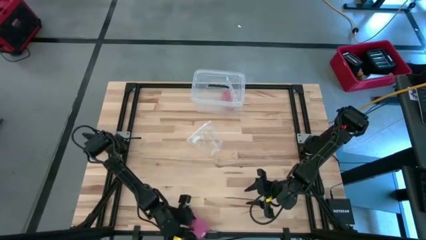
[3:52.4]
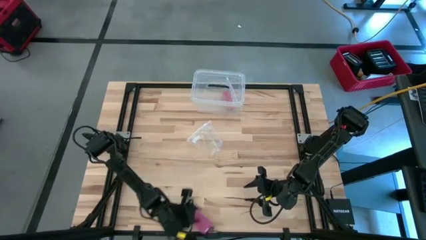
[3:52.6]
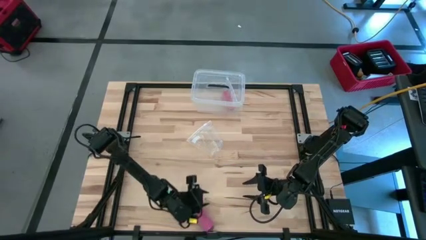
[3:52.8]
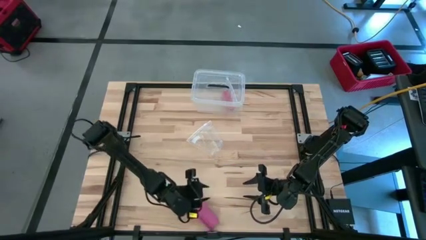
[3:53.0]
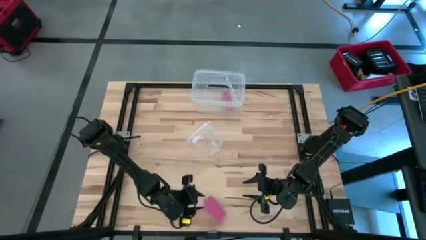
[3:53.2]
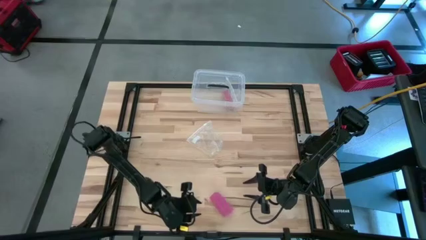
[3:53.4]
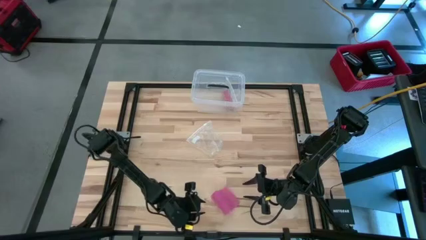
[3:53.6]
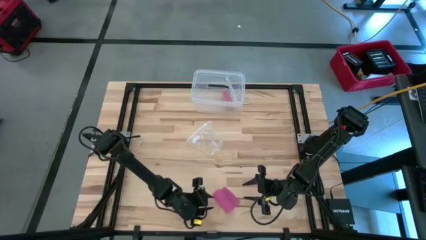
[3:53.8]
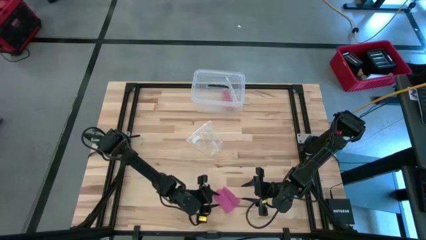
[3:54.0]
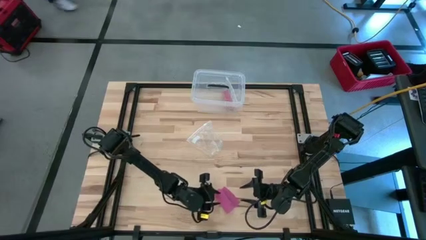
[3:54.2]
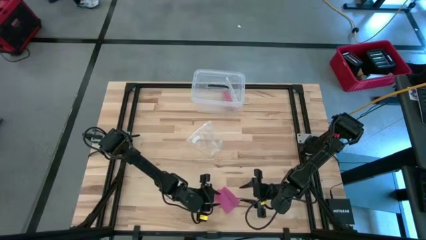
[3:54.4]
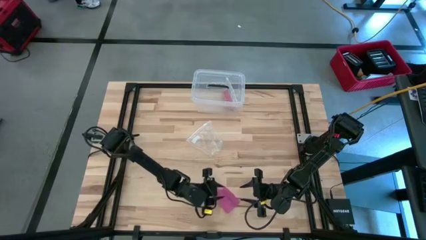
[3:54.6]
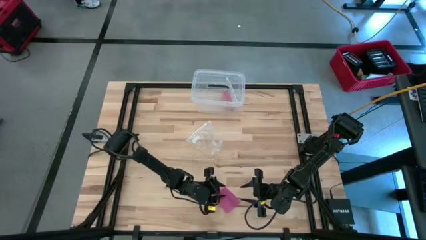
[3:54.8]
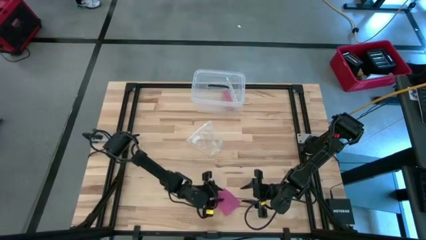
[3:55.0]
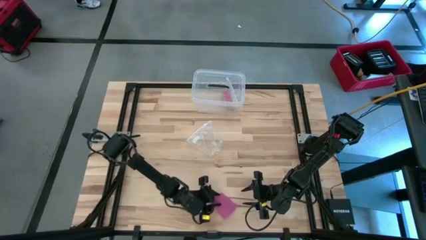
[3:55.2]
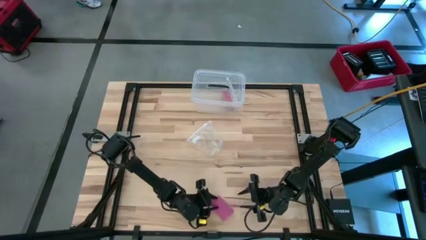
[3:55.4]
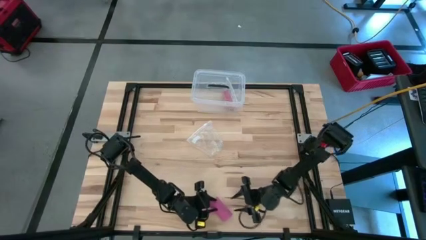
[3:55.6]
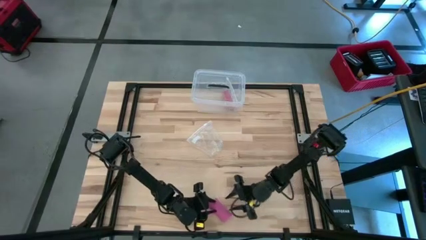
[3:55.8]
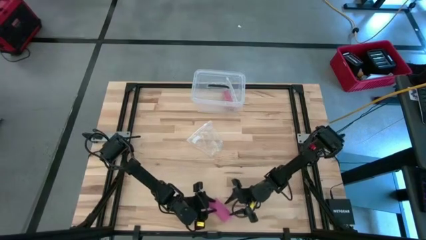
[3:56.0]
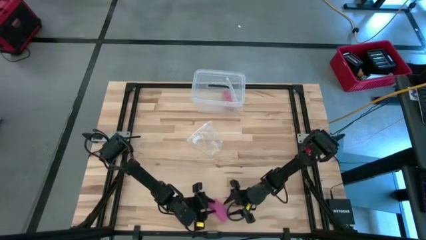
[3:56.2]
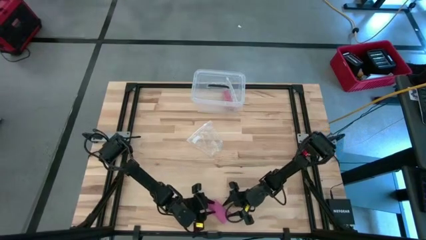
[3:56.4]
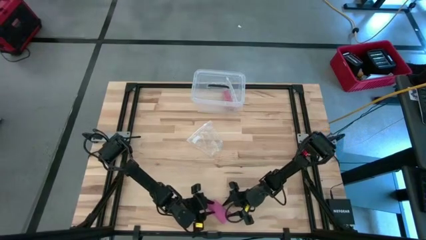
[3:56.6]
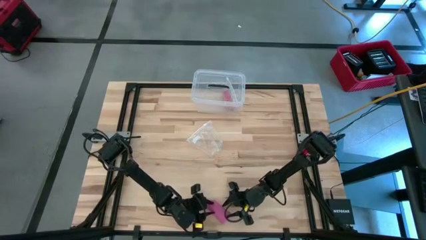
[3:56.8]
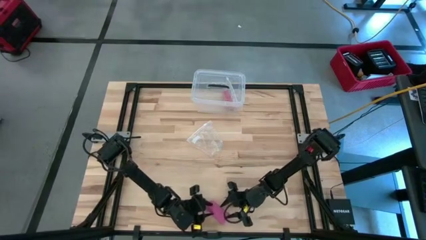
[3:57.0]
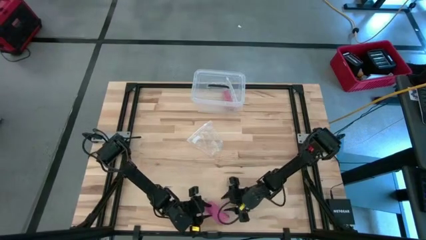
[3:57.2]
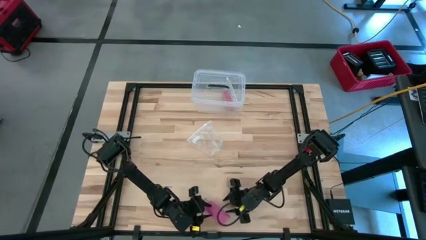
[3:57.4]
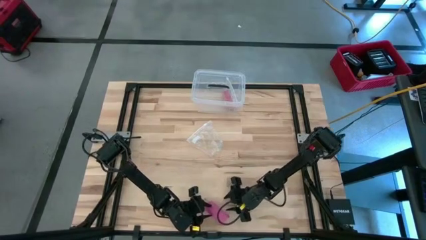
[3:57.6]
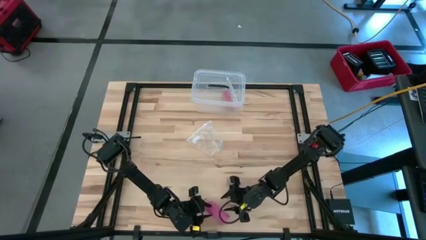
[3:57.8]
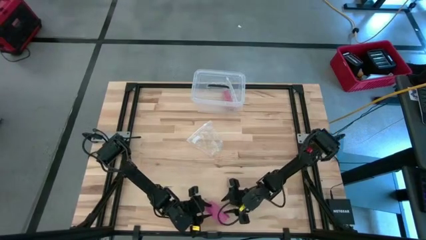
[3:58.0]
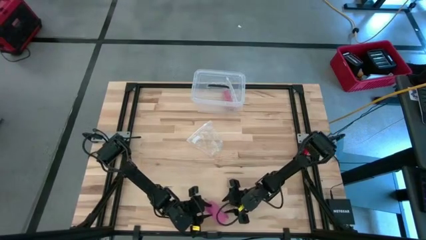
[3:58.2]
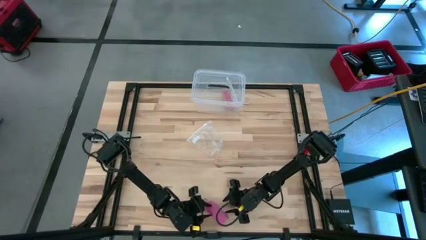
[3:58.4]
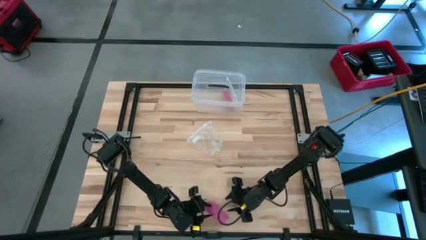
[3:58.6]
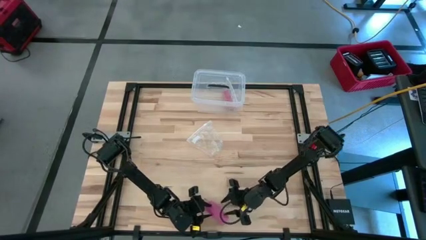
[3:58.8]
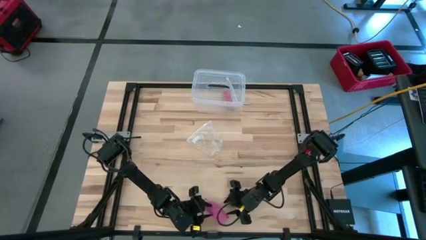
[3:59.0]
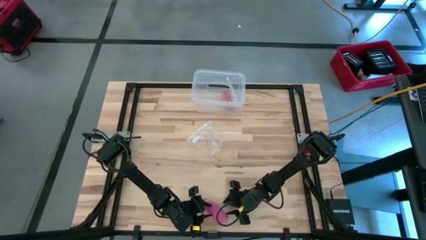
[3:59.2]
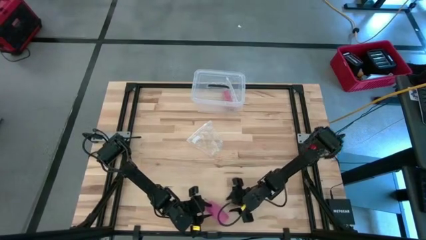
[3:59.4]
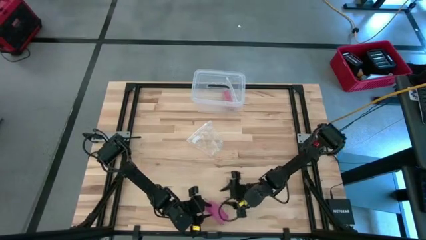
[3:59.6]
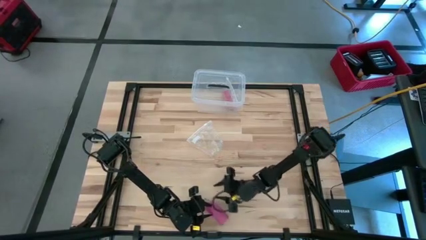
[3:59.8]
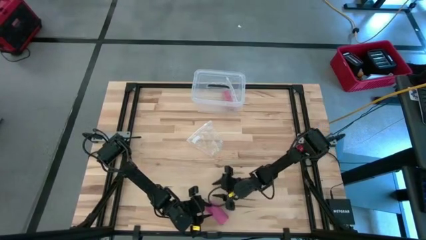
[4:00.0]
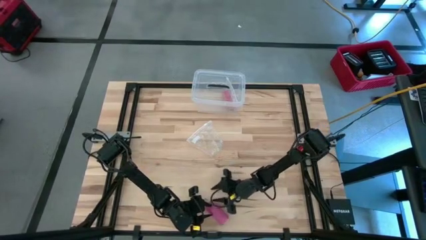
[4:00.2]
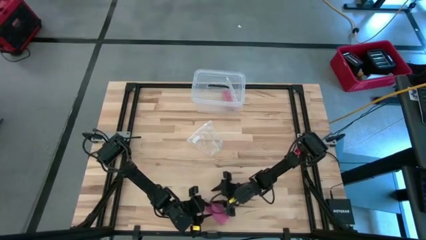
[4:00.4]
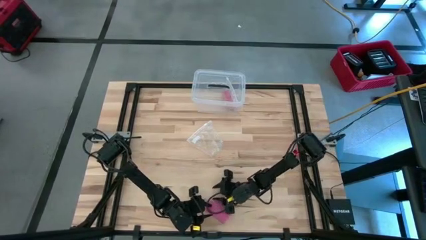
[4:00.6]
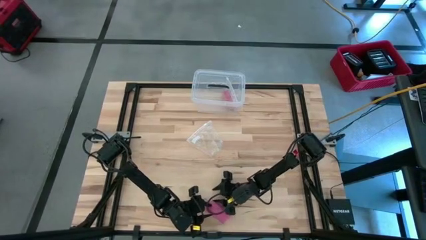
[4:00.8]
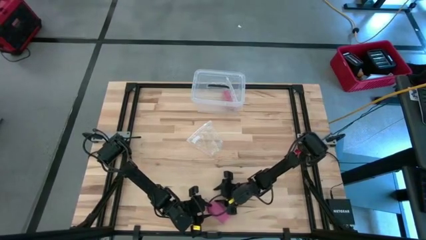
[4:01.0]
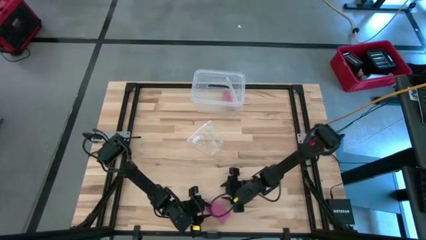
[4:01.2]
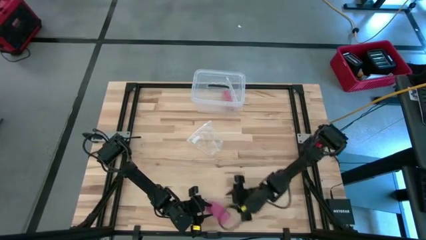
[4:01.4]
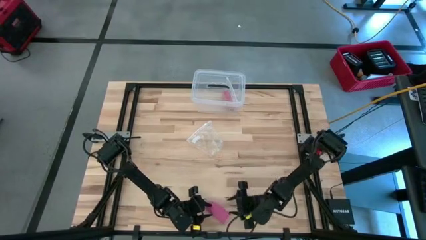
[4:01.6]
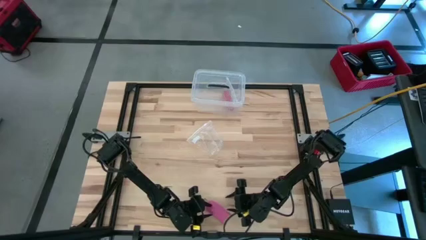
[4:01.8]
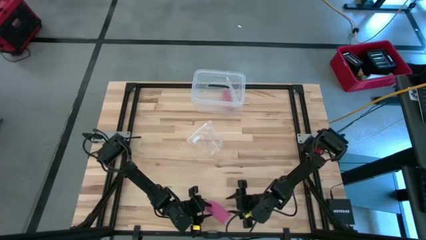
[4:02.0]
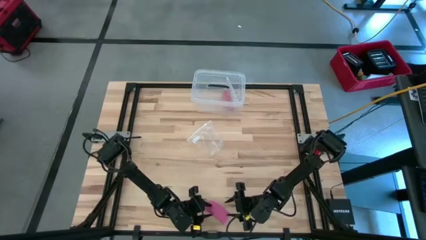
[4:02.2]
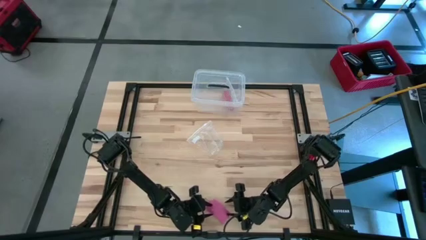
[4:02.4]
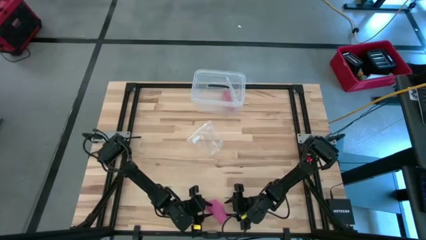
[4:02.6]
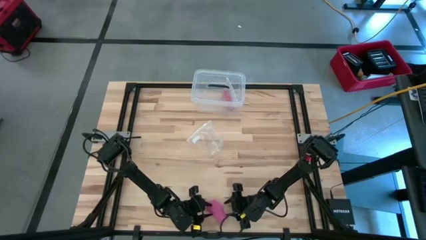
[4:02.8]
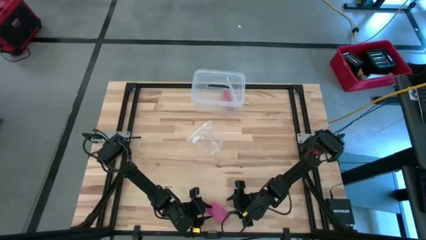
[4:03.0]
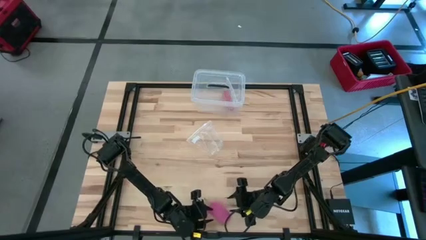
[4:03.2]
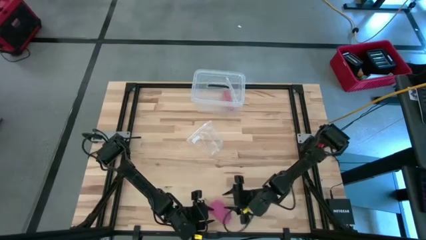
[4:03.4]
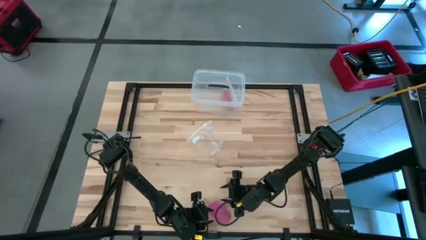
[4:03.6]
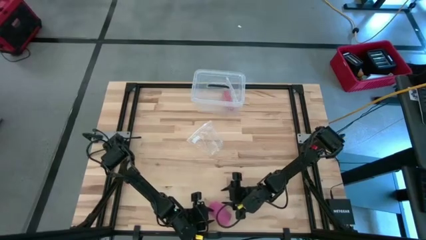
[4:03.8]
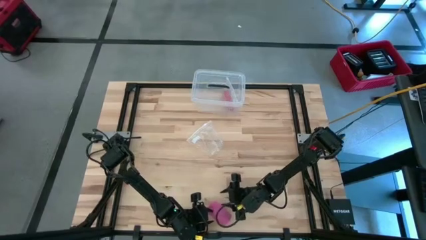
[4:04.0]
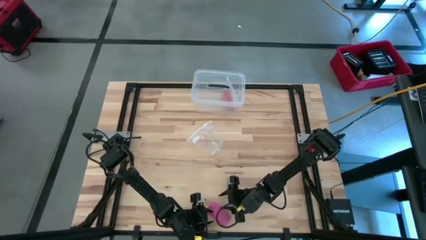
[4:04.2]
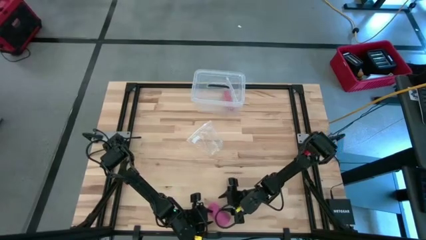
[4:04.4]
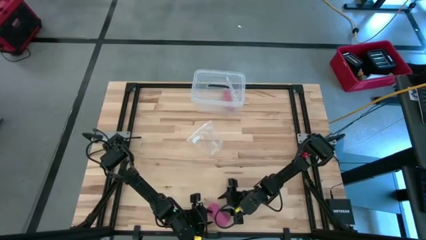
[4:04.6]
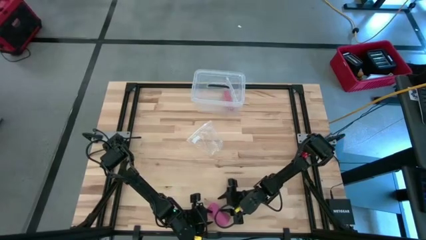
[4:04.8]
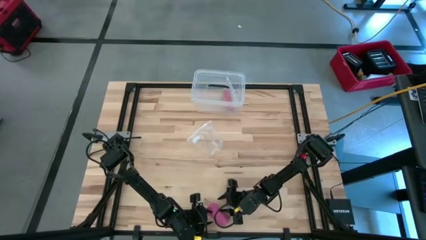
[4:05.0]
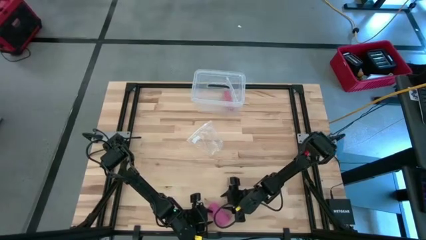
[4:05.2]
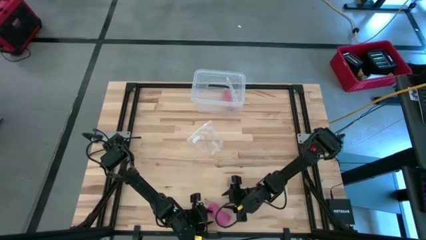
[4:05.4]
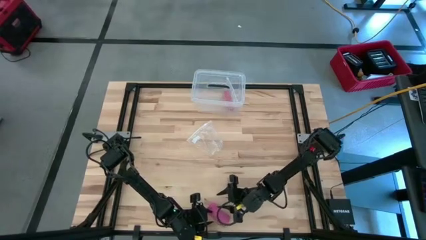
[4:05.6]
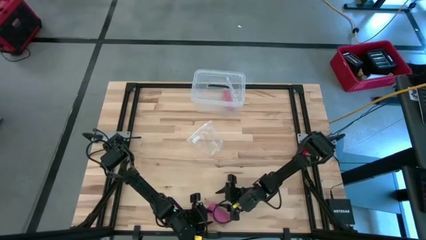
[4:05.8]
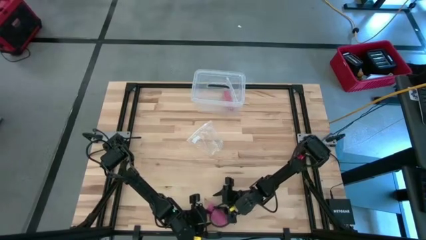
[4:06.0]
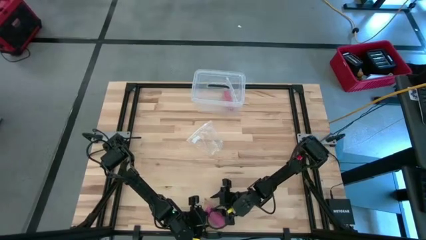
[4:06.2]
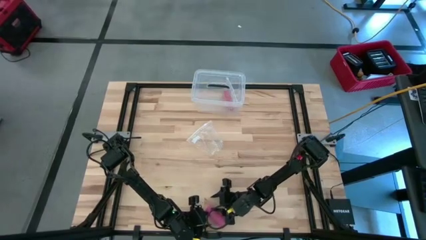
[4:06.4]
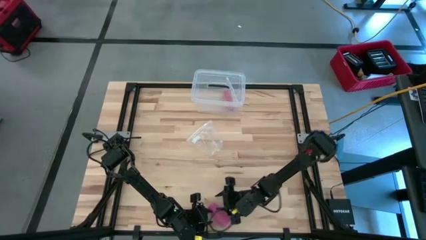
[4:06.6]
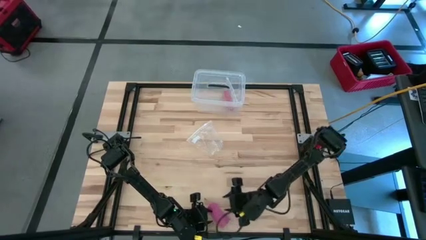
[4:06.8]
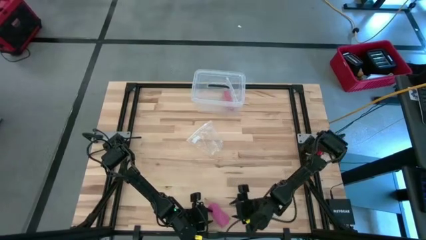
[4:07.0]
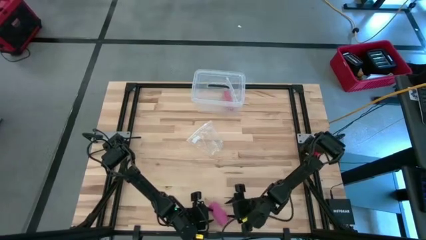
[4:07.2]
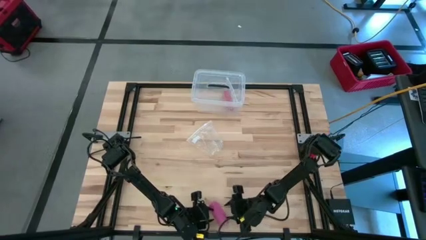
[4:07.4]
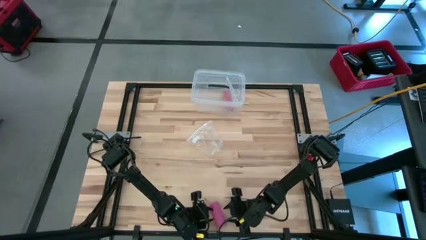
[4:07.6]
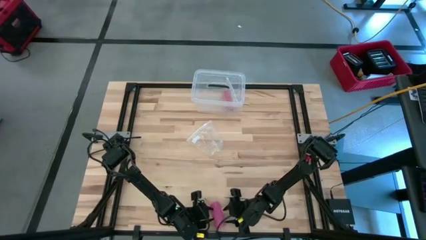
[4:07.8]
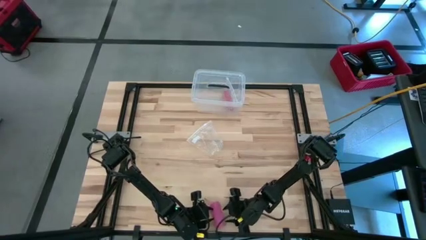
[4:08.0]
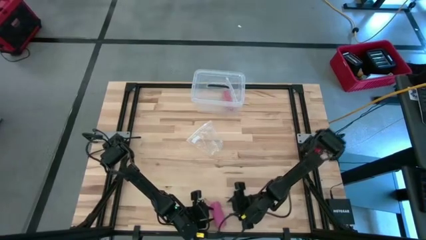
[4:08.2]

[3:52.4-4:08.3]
Task: Roll bandage
Roll the pink bandage

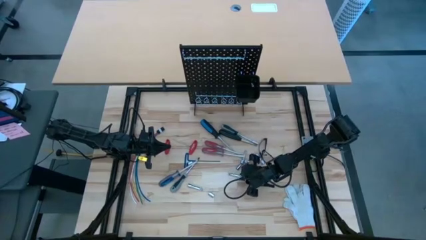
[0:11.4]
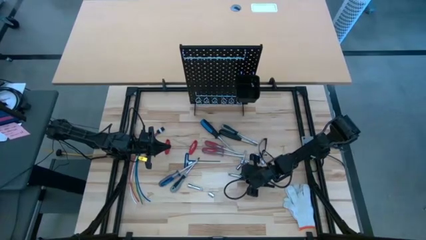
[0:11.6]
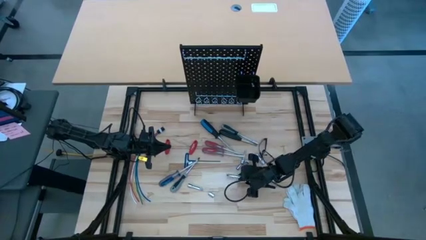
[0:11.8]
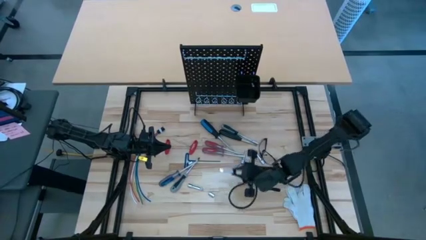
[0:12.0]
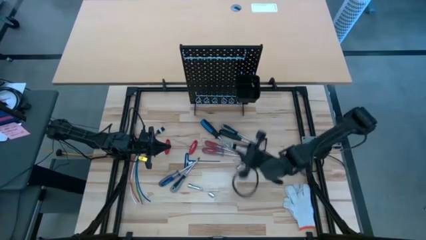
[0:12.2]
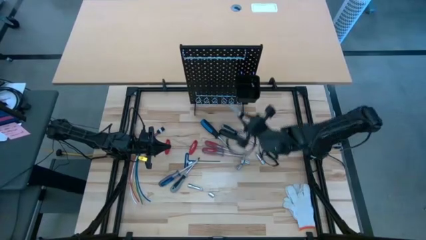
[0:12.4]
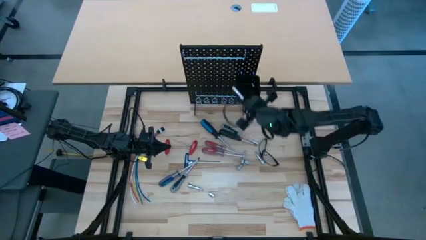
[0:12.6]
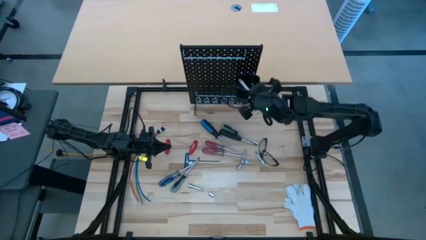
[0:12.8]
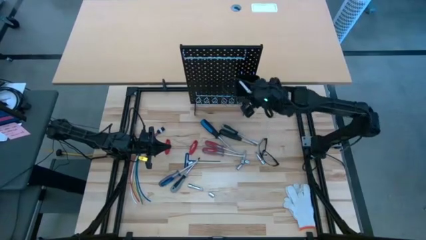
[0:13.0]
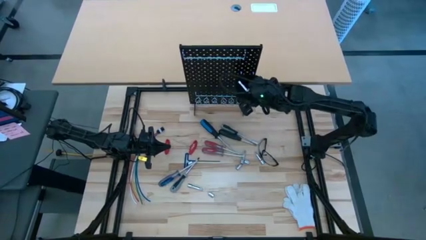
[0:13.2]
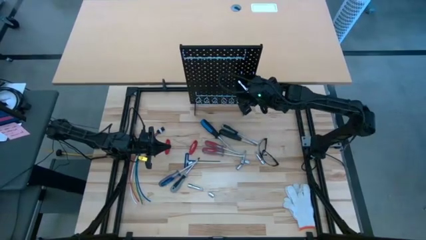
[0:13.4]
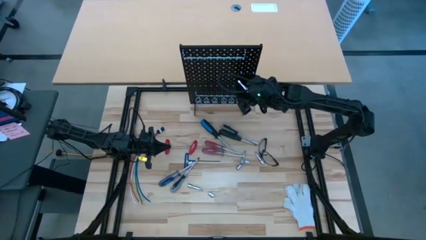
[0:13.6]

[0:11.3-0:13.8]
Task: Hang tools onto peg board
Put the extension bar into the bin of the pegboard
